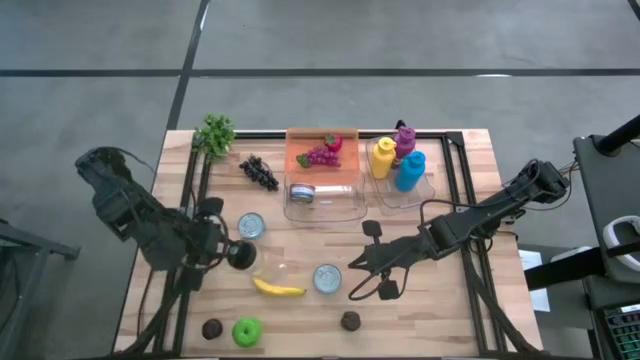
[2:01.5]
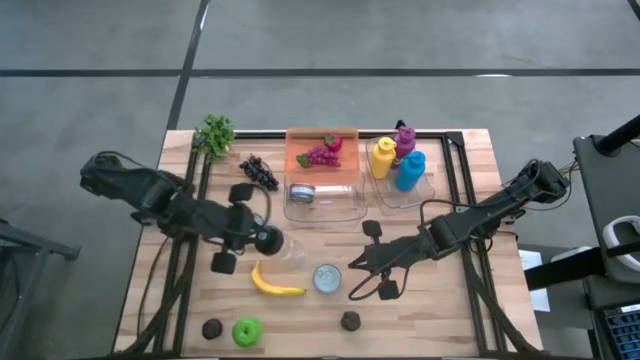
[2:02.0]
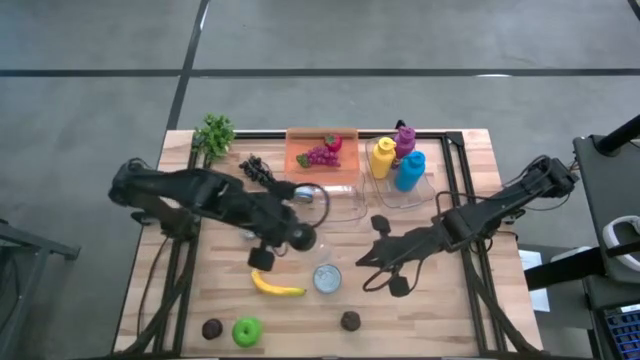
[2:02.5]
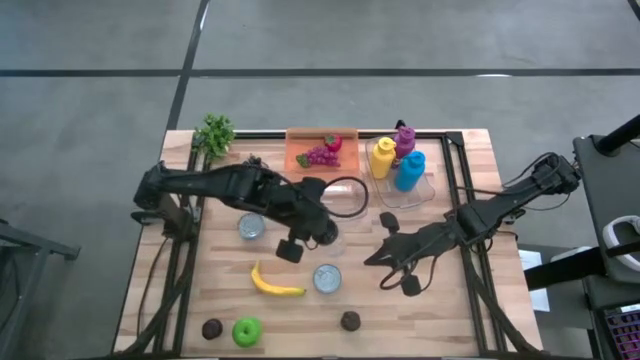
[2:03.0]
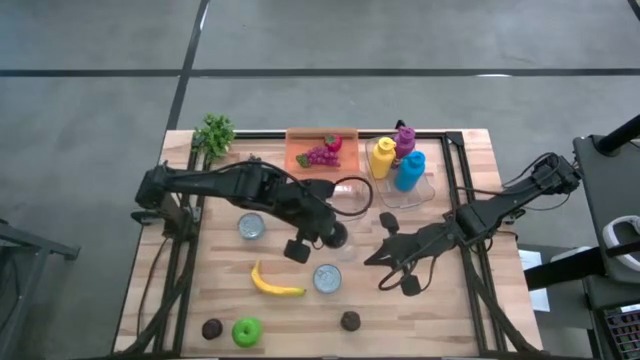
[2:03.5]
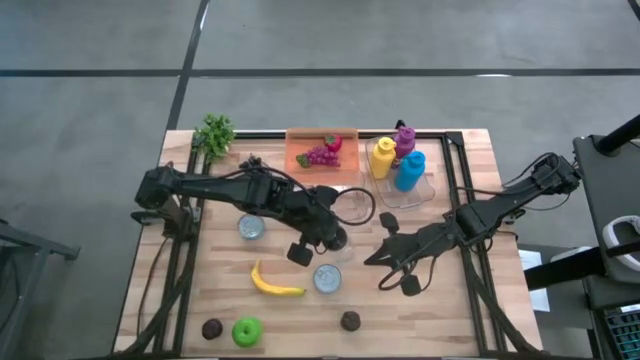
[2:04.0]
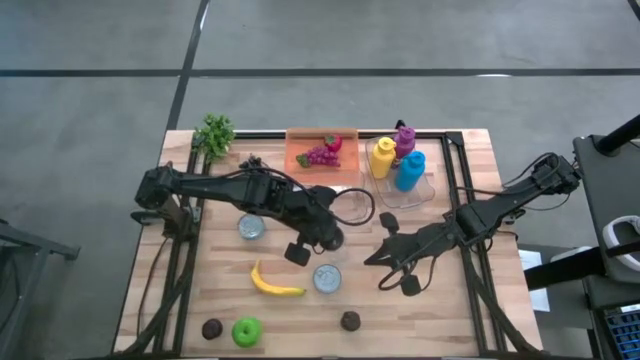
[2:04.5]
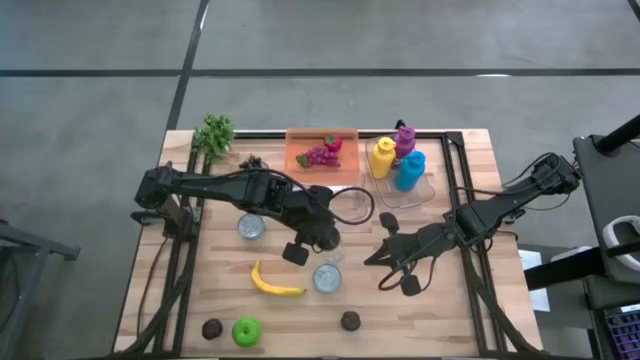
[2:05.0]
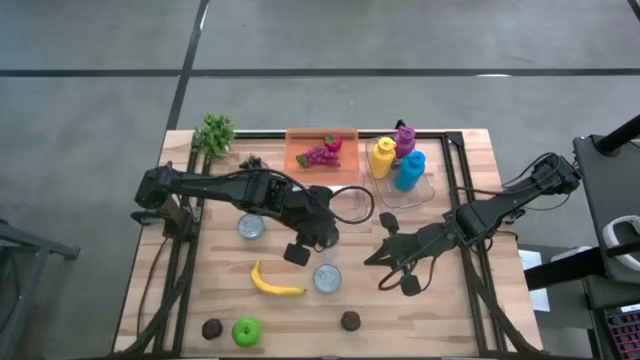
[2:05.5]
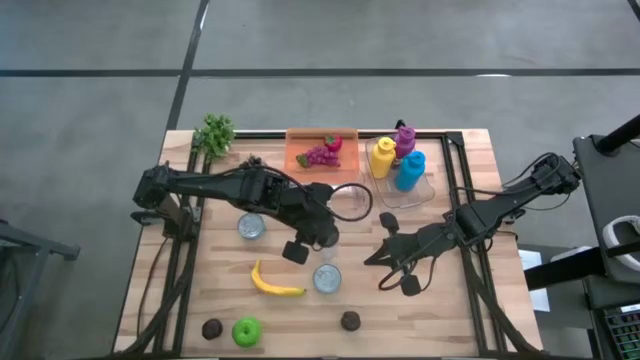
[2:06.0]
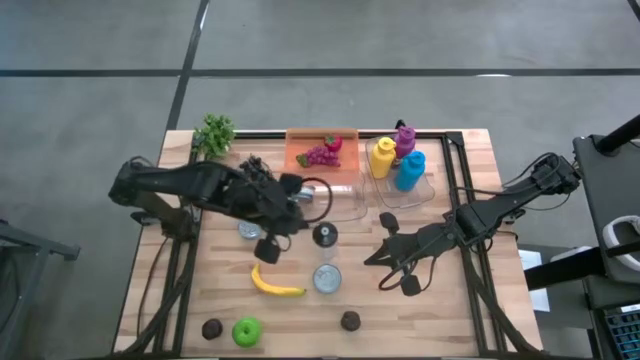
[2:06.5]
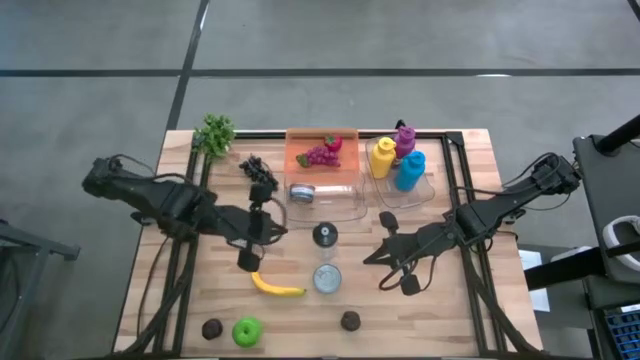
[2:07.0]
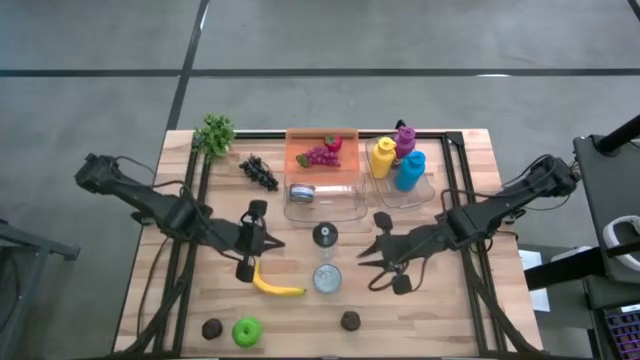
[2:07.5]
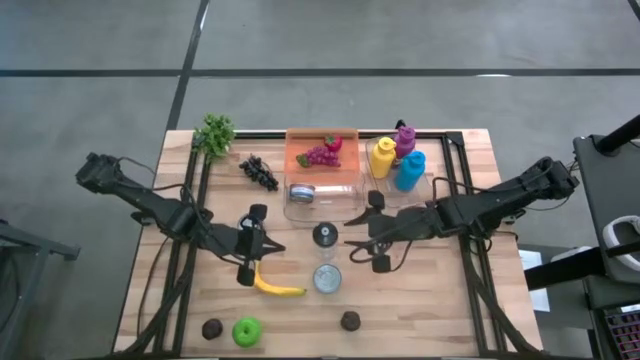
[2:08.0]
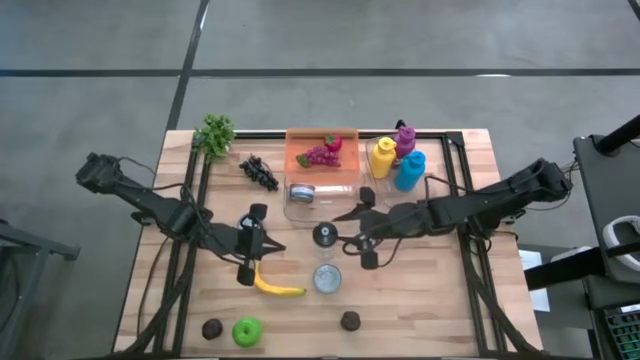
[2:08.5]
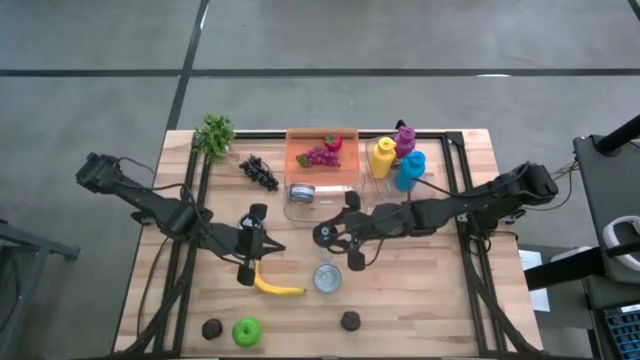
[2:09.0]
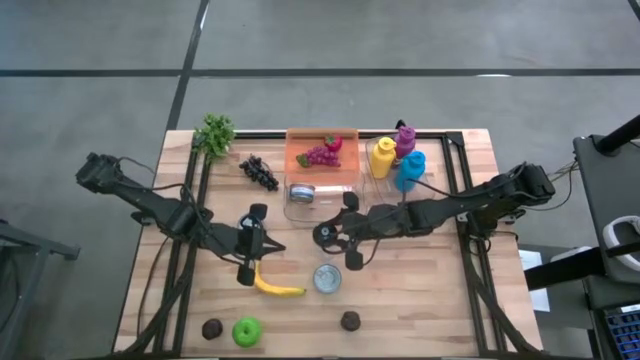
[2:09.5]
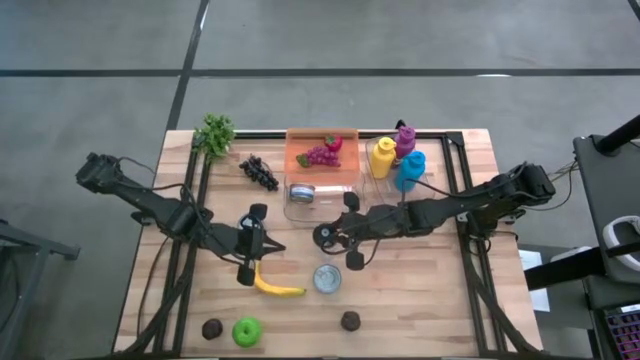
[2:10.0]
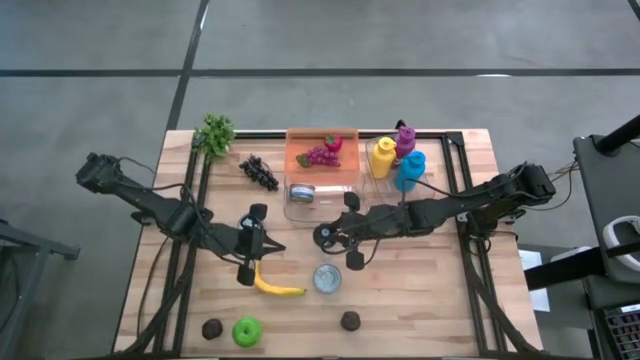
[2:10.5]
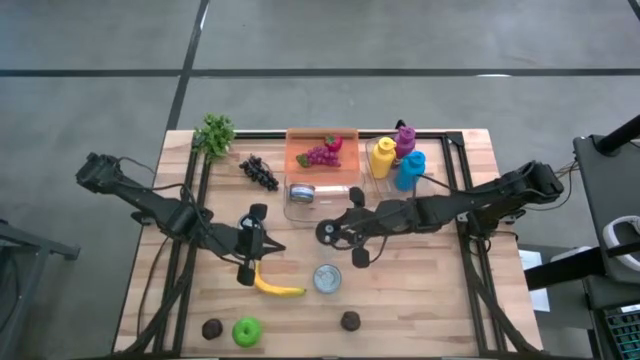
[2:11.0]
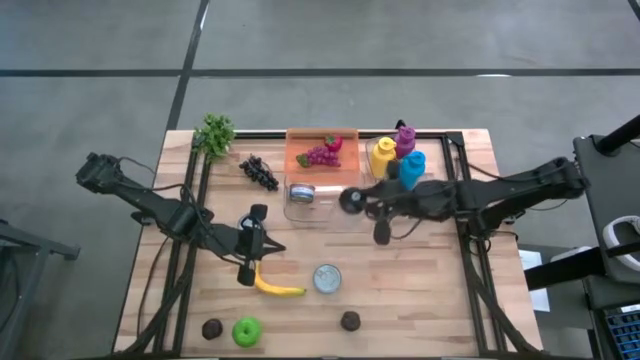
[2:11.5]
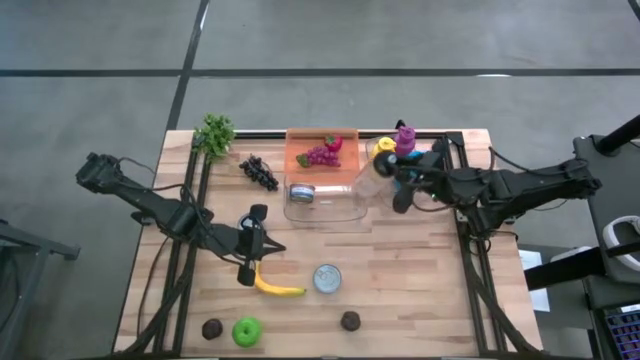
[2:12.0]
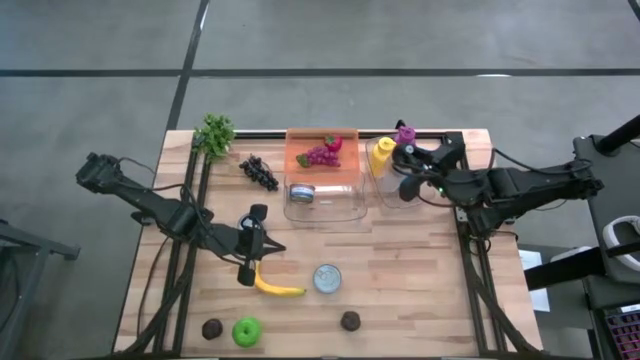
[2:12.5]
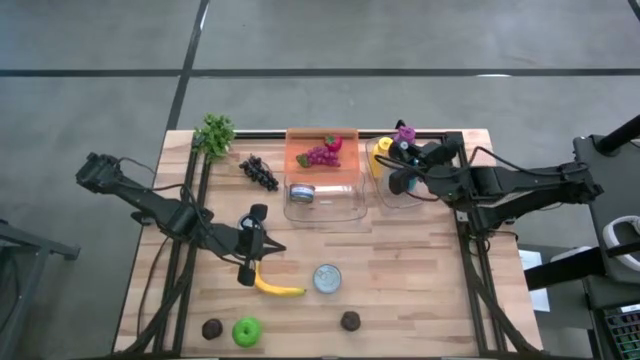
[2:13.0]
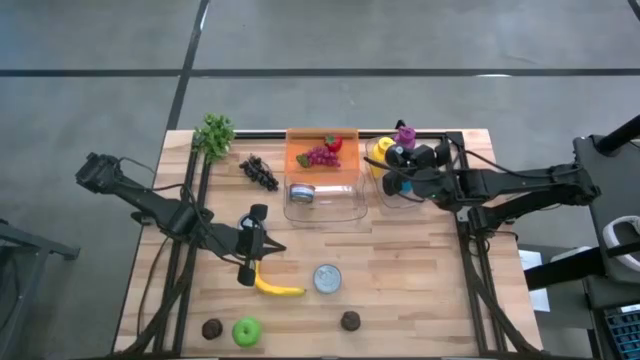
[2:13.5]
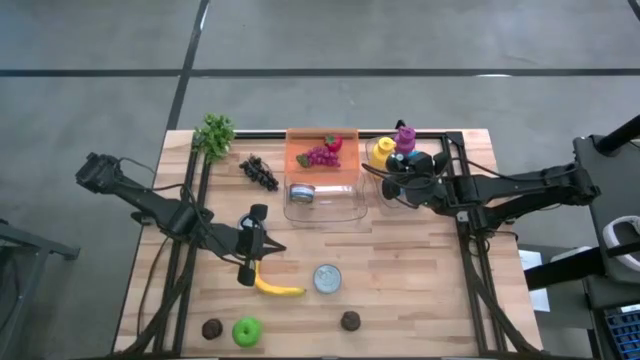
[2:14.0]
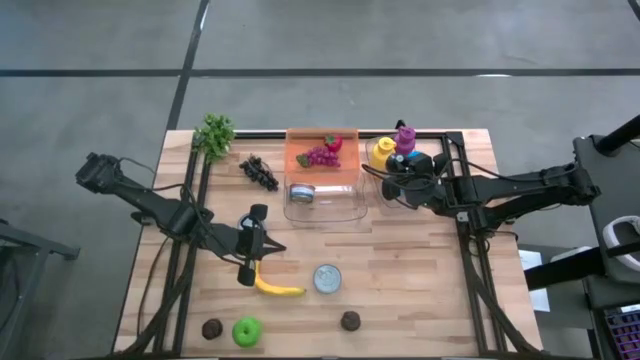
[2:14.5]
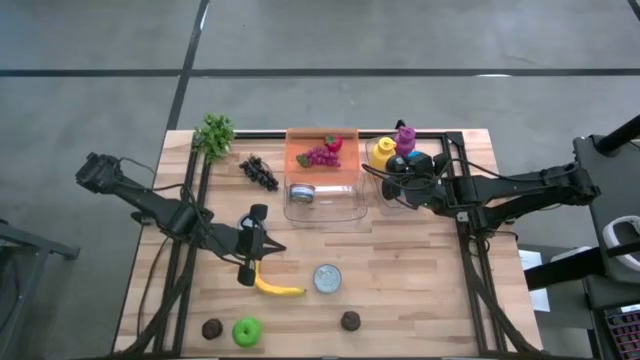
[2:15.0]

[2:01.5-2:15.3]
Task: Pick & Place Food Item
Put the transparent water bottle into the right transparent bin

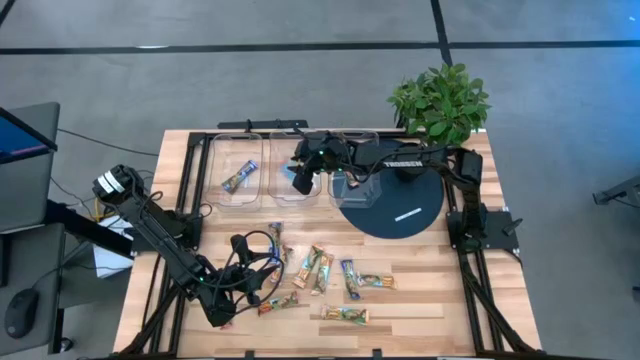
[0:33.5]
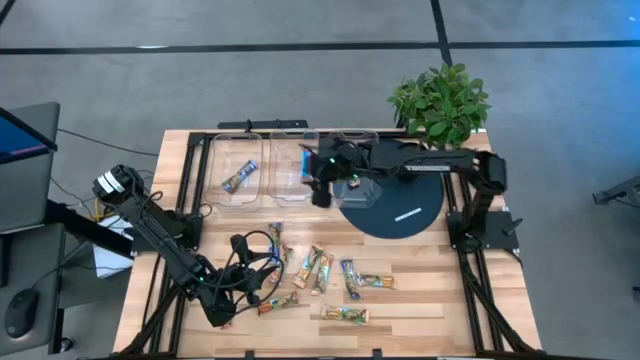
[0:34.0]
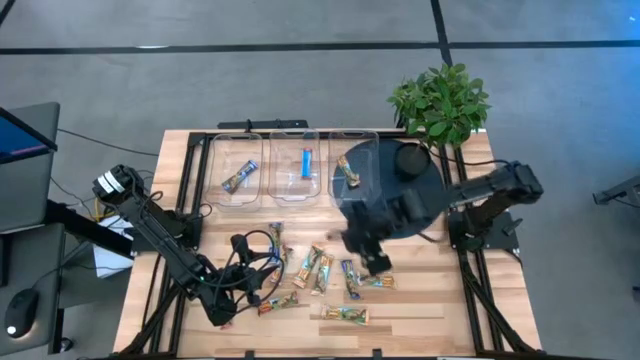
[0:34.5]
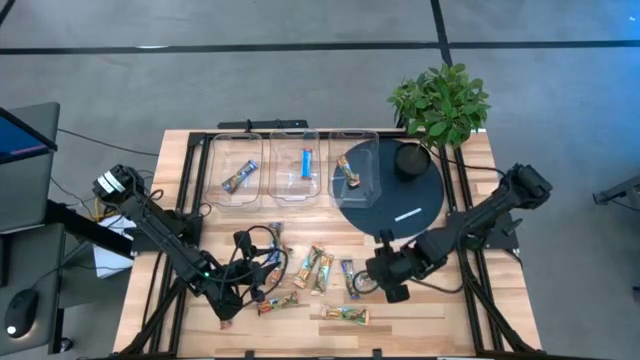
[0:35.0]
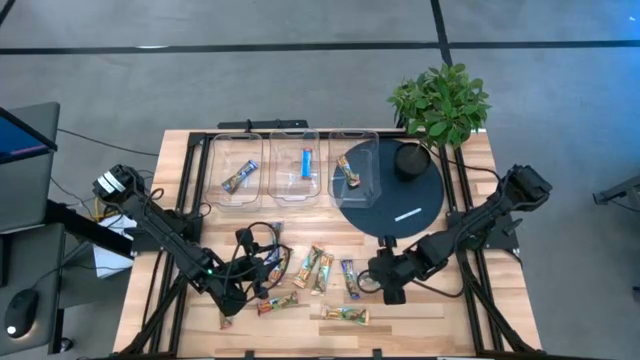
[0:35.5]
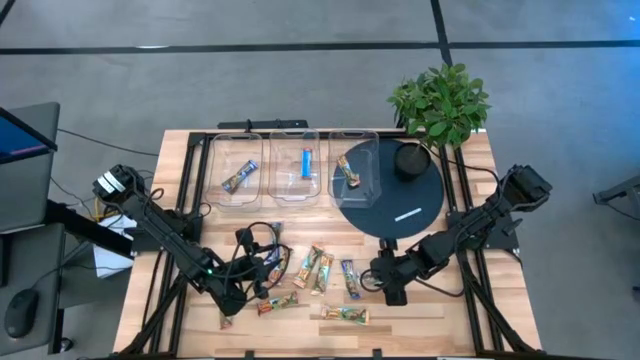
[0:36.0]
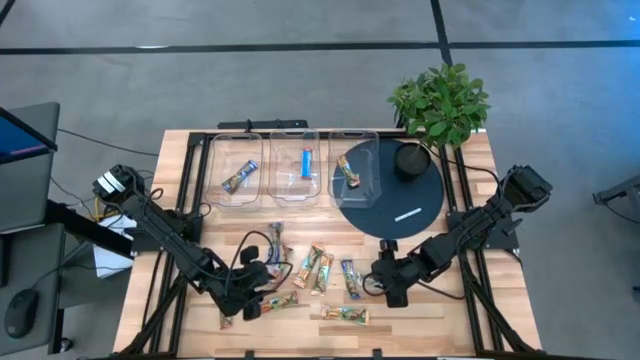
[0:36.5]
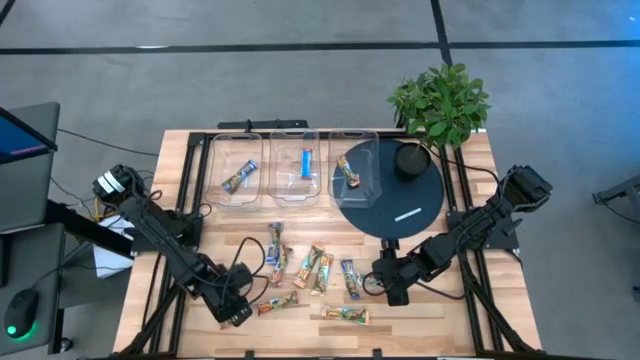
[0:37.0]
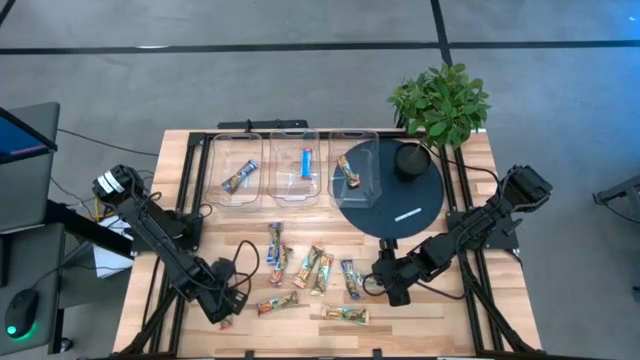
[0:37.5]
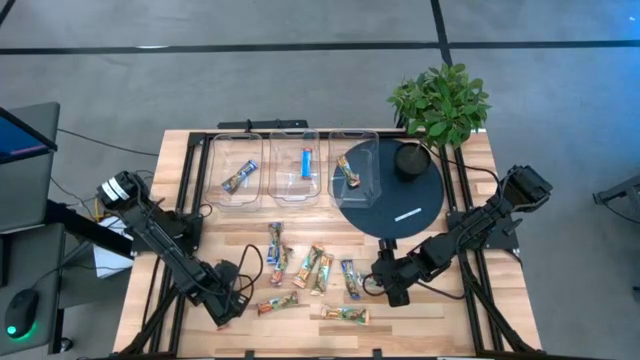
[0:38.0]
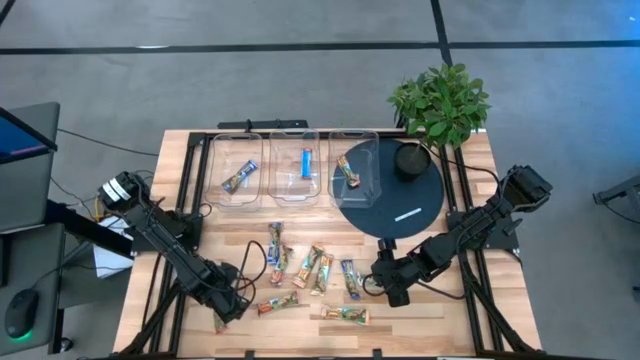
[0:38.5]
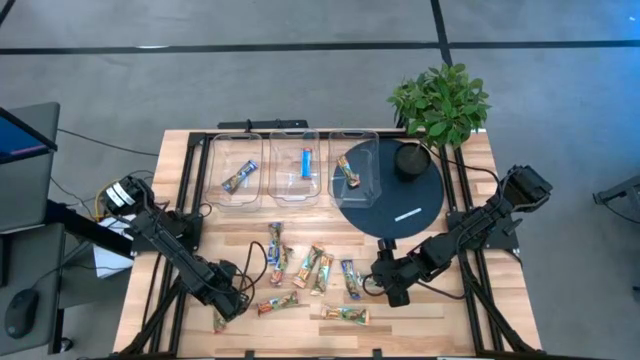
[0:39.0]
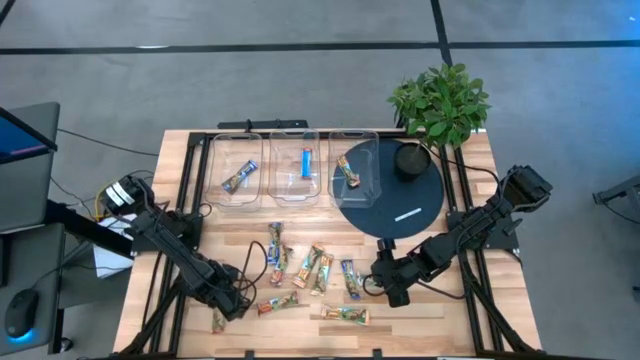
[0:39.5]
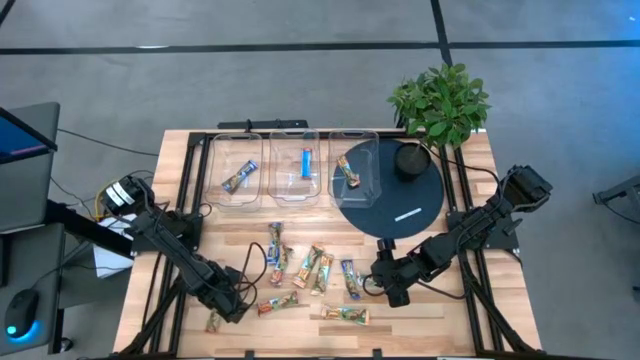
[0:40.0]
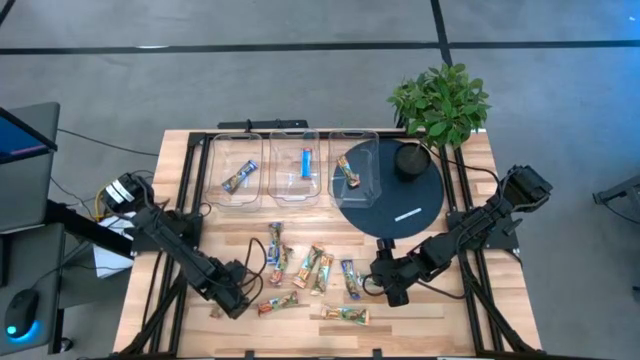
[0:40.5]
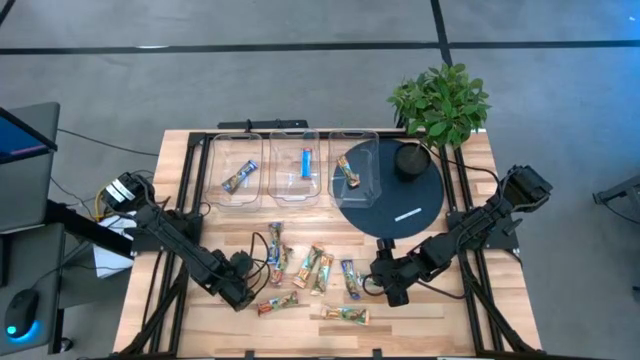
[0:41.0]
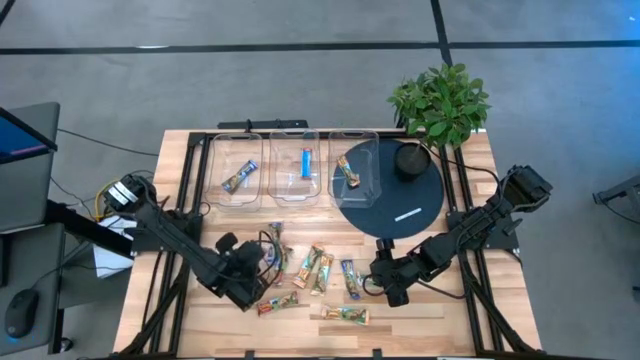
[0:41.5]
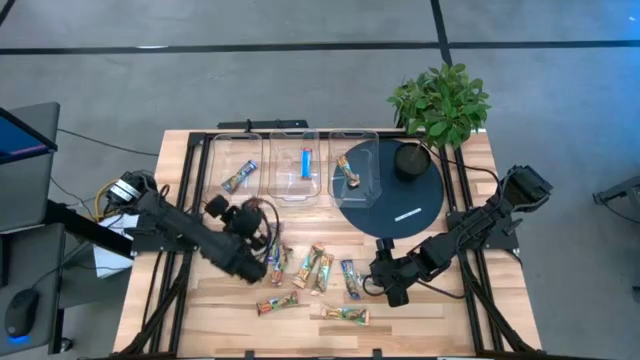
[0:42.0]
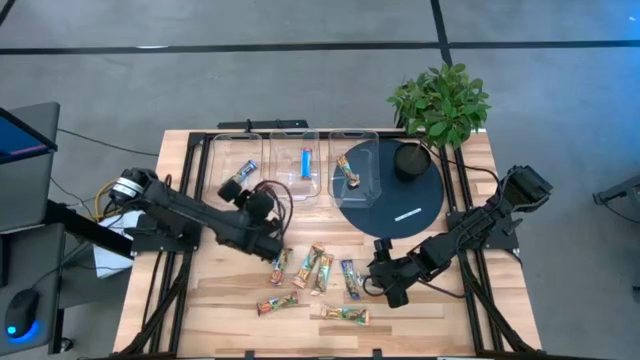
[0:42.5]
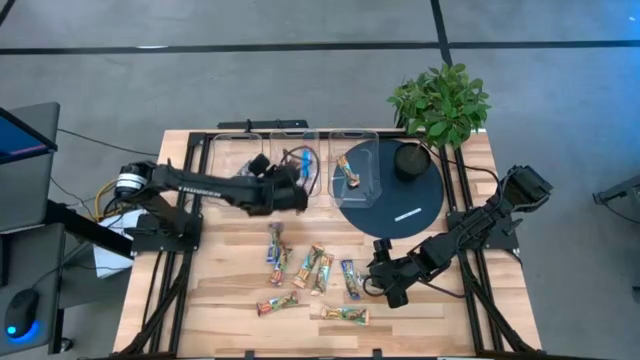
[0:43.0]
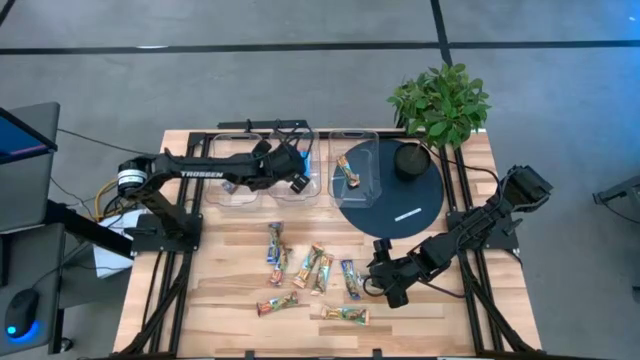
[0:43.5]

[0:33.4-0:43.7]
Task: Pick and place Granola Bars by type
Put the bottom left red chocolate chip into the center transparent bin
